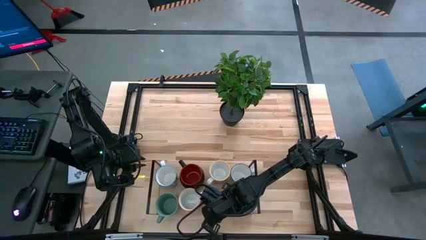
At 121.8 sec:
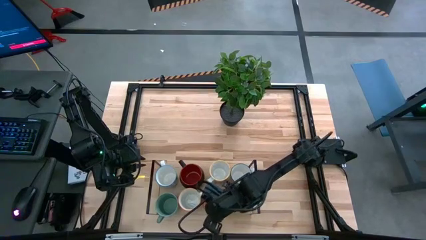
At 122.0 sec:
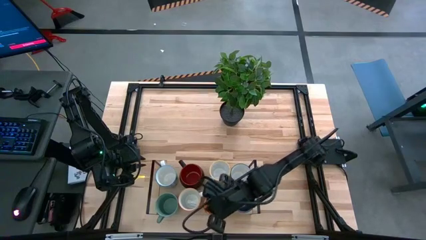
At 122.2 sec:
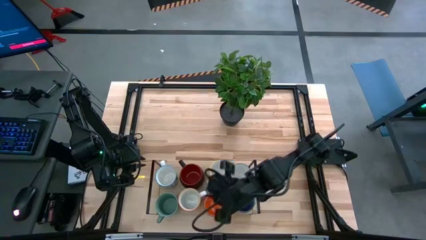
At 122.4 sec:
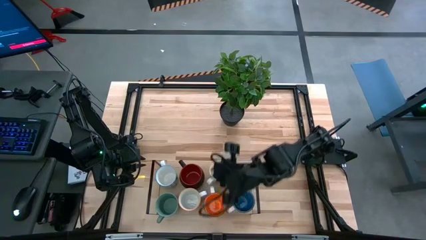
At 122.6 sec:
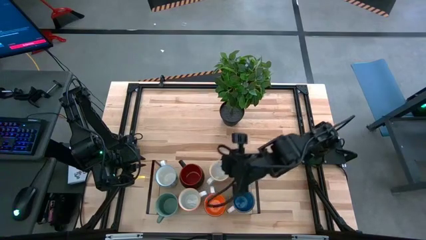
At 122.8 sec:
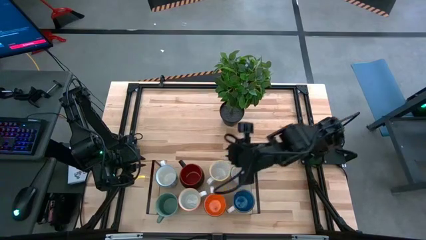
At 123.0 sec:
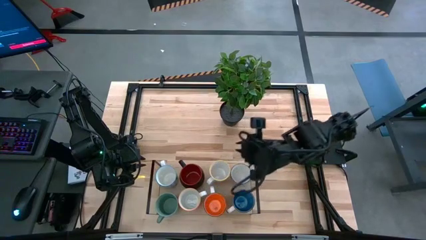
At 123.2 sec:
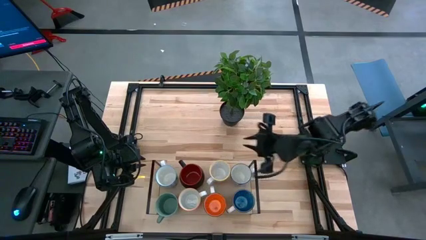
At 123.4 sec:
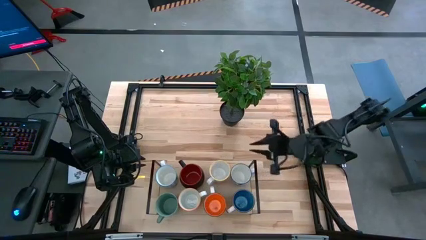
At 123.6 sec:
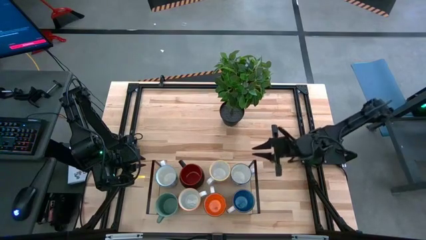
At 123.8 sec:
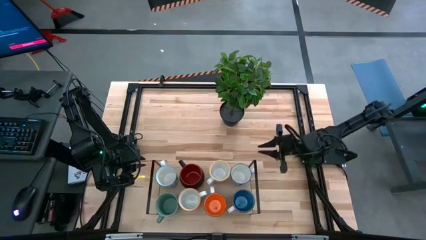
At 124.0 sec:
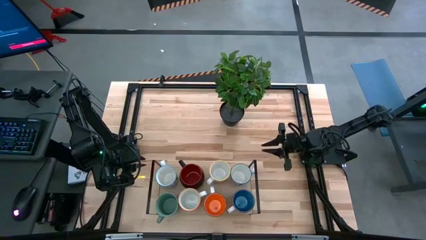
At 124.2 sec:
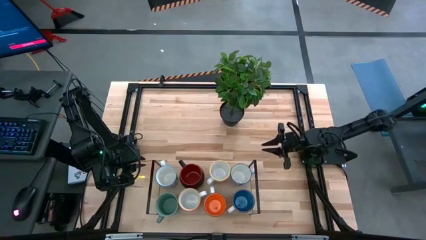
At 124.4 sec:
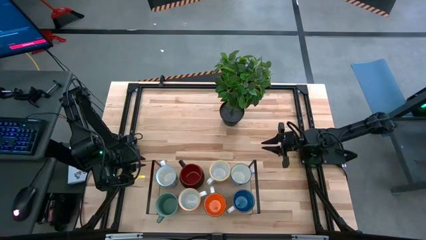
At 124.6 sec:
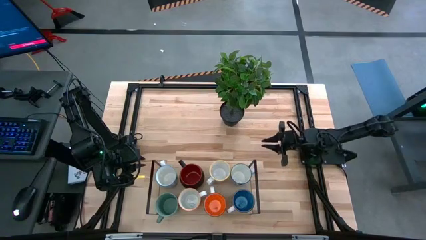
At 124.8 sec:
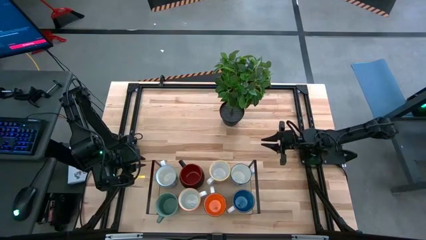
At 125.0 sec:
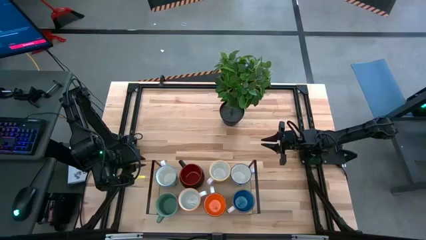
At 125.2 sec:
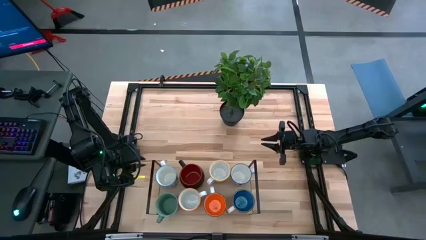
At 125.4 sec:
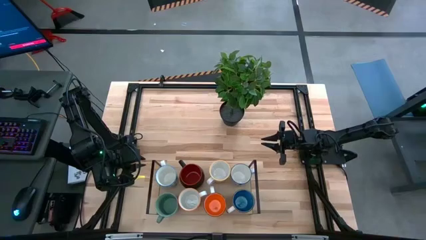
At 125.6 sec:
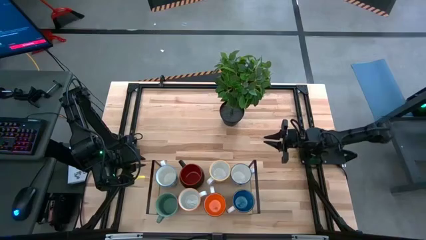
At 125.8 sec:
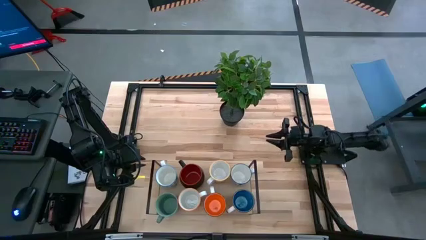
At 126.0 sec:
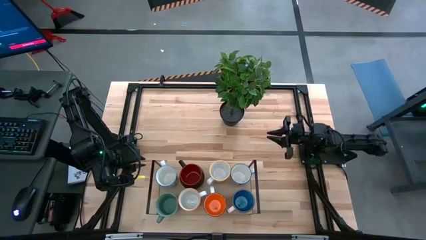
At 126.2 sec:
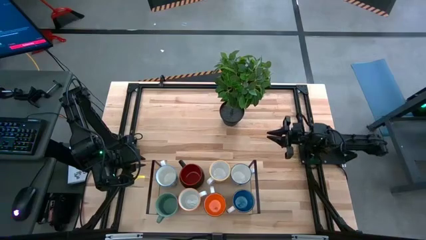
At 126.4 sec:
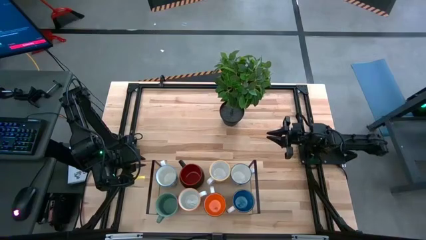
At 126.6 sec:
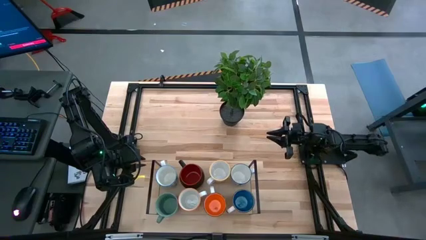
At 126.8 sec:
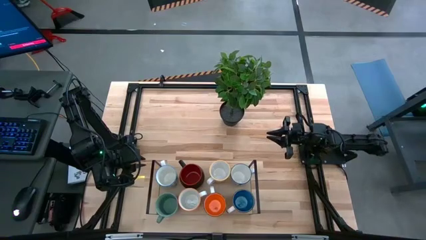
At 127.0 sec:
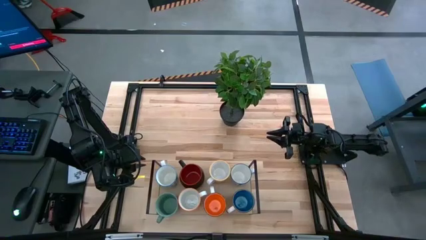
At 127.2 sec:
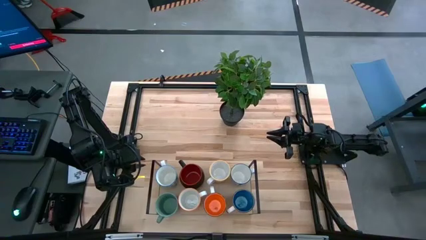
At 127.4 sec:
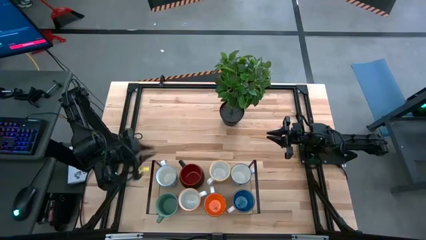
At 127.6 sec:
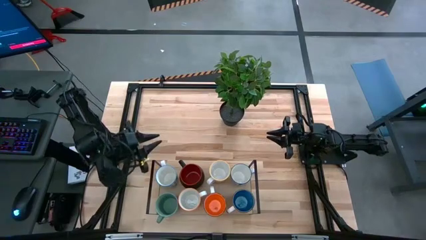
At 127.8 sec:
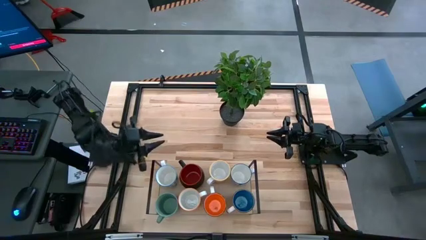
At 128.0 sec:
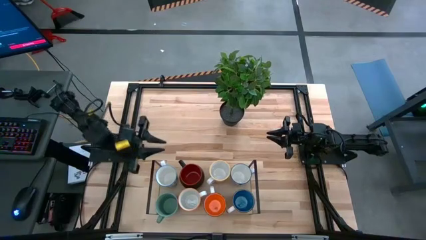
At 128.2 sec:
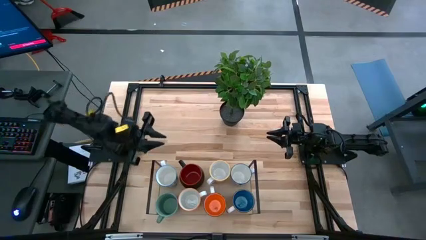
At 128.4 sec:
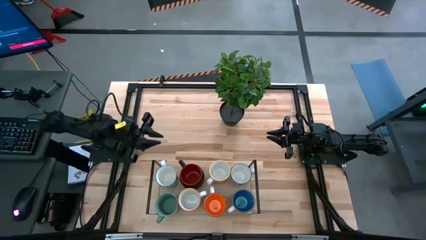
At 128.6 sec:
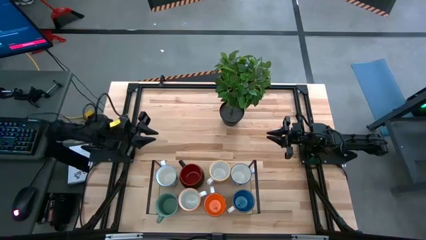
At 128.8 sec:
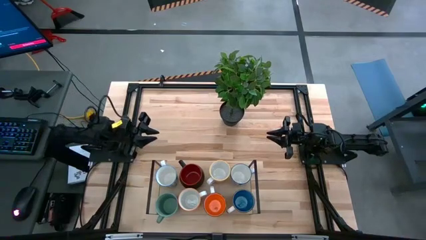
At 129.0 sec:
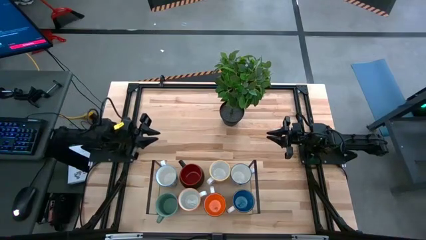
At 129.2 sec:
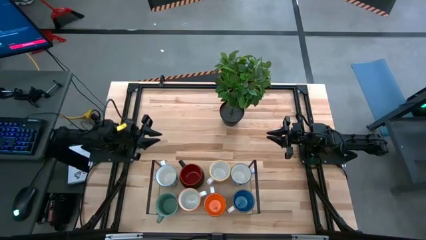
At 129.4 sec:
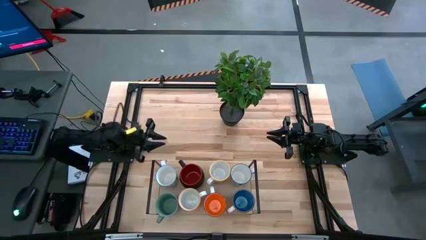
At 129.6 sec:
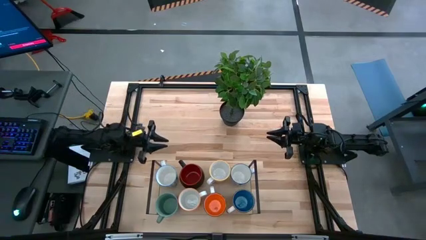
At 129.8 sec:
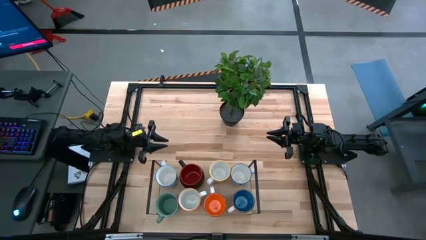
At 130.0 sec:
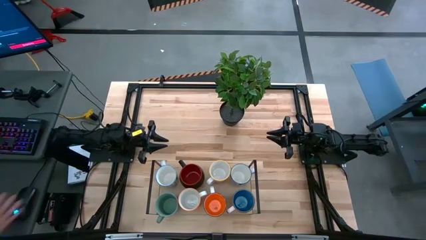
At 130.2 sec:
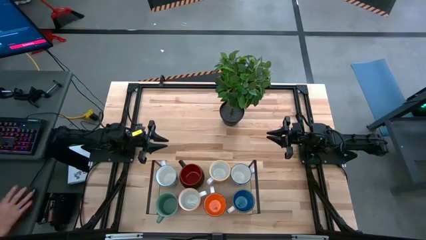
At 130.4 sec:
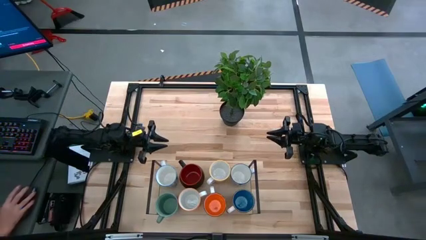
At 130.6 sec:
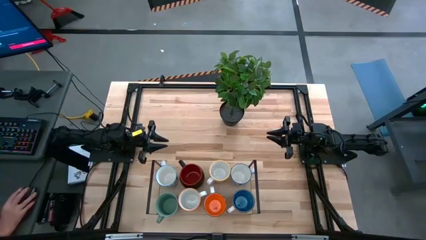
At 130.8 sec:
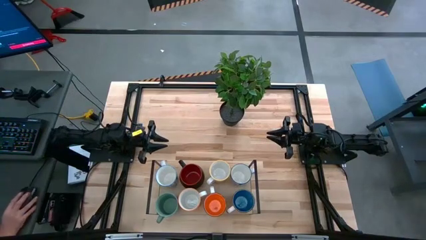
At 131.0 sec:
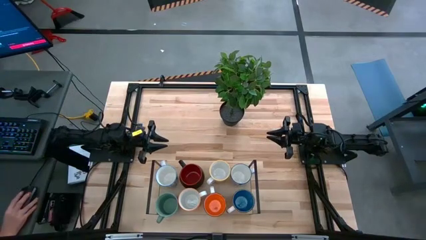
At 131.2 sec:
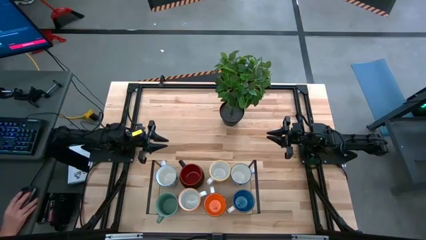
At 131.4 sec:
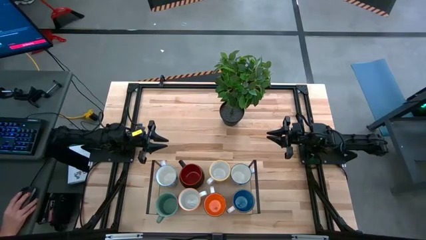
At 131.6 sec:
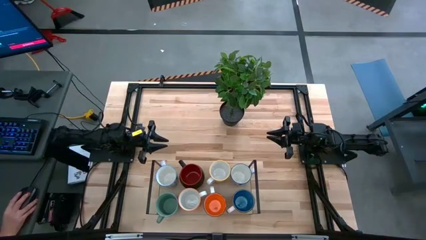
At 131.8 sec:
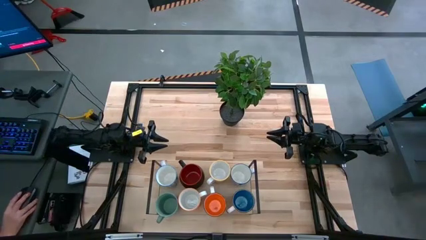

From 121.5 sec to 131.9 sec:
Task: Place coffee mugs
Return to Home Position

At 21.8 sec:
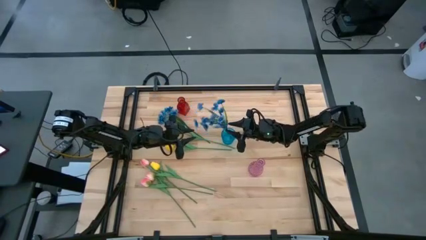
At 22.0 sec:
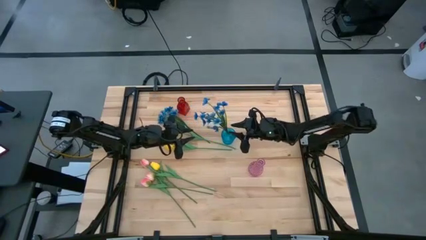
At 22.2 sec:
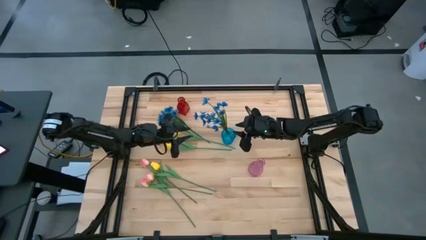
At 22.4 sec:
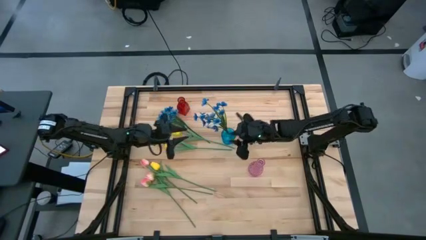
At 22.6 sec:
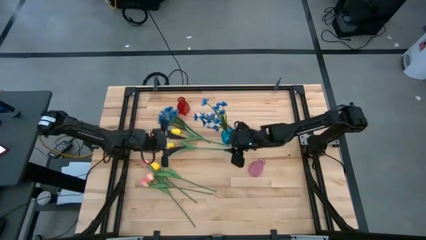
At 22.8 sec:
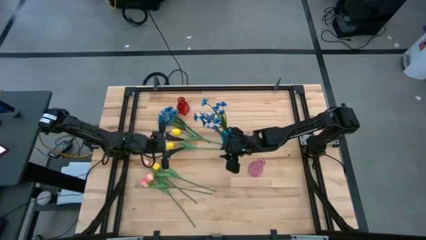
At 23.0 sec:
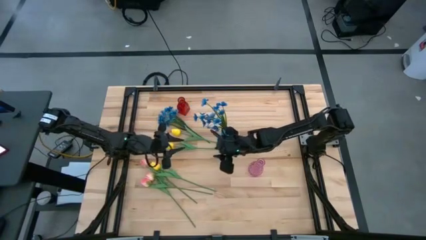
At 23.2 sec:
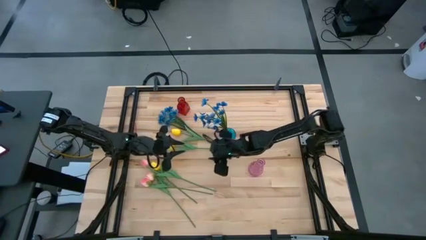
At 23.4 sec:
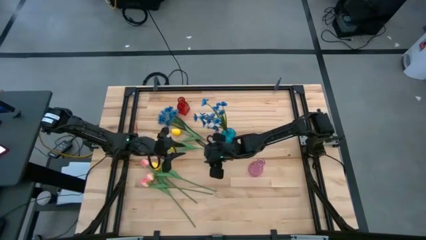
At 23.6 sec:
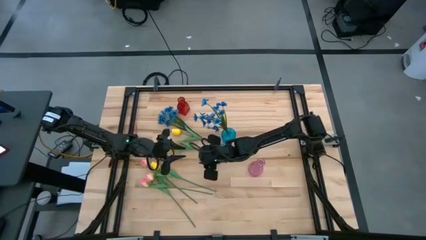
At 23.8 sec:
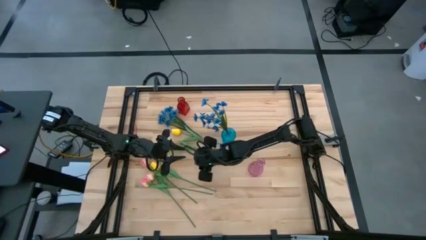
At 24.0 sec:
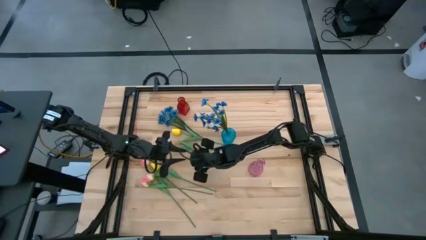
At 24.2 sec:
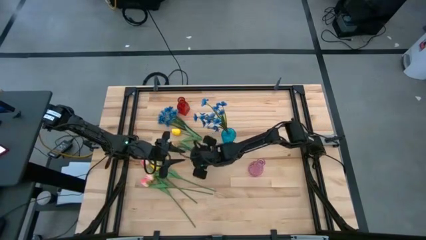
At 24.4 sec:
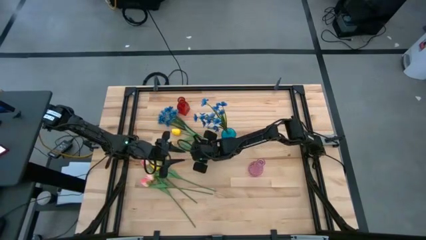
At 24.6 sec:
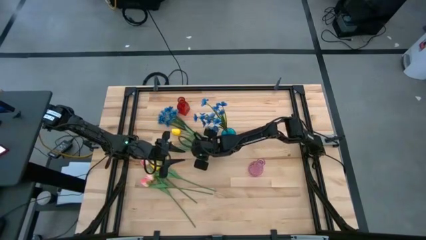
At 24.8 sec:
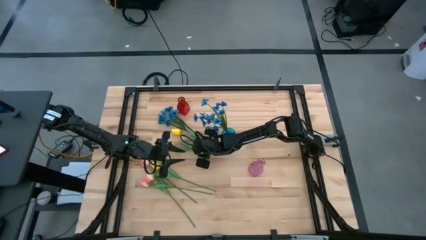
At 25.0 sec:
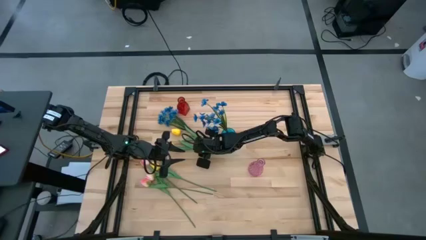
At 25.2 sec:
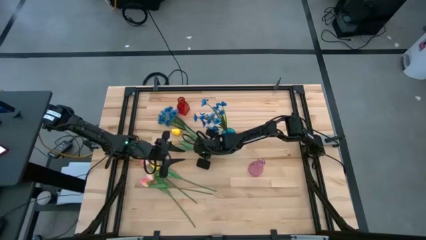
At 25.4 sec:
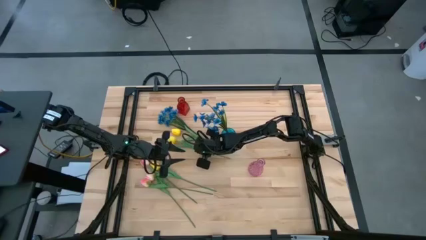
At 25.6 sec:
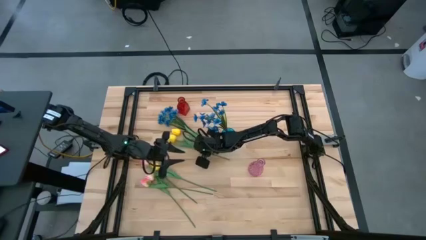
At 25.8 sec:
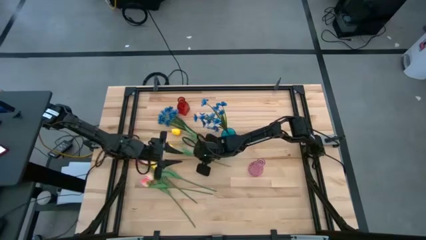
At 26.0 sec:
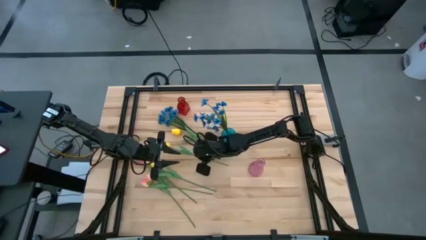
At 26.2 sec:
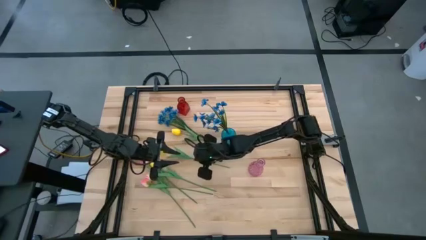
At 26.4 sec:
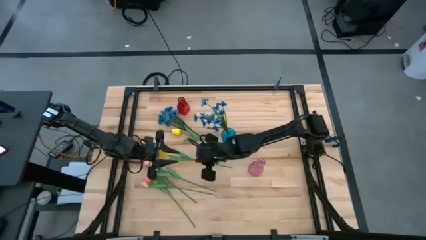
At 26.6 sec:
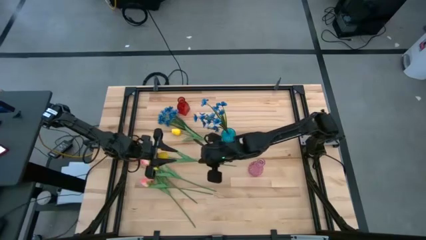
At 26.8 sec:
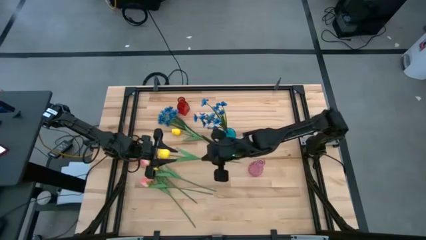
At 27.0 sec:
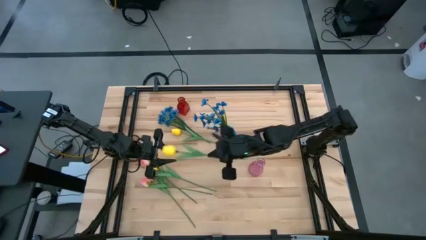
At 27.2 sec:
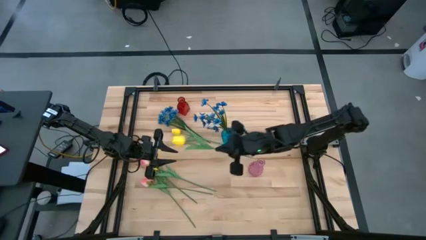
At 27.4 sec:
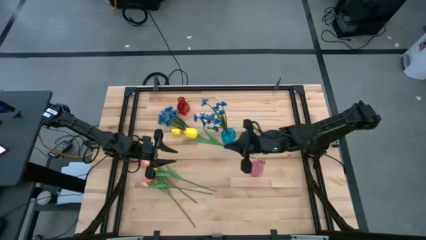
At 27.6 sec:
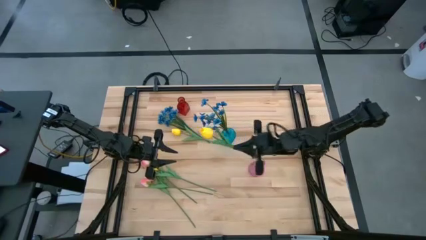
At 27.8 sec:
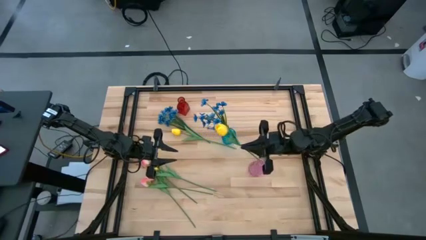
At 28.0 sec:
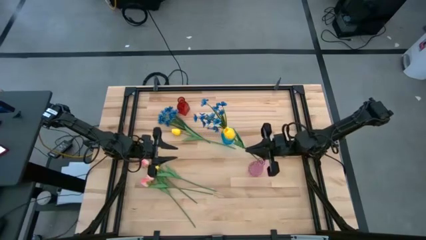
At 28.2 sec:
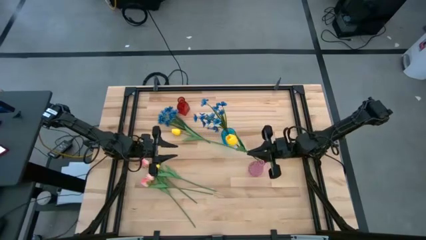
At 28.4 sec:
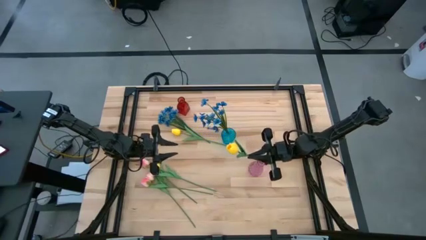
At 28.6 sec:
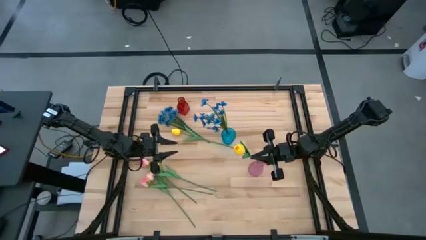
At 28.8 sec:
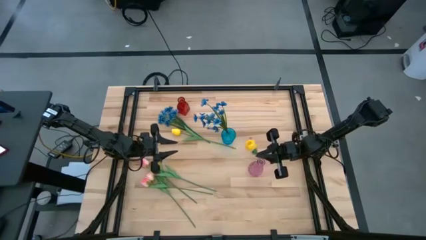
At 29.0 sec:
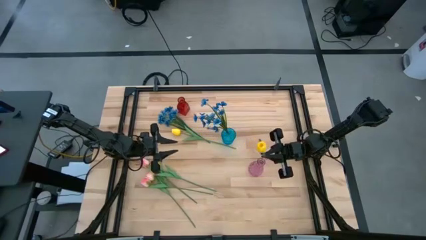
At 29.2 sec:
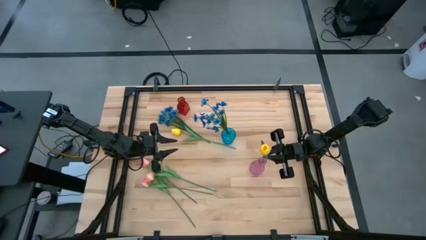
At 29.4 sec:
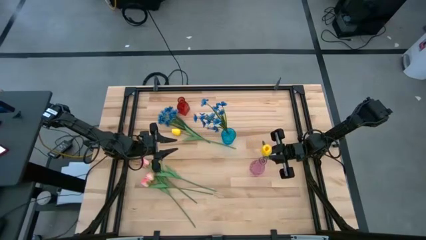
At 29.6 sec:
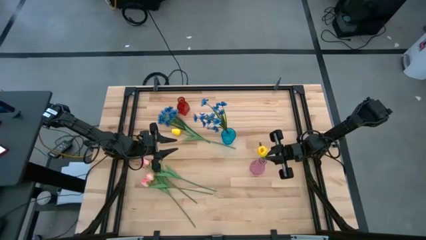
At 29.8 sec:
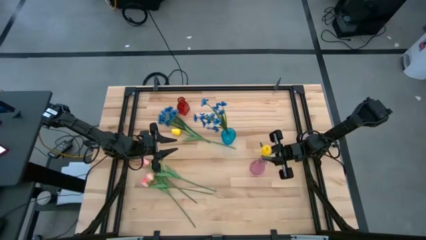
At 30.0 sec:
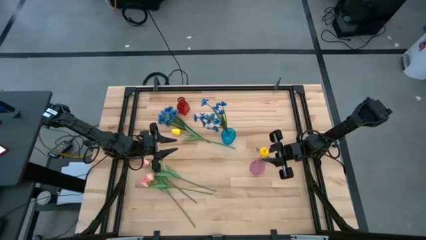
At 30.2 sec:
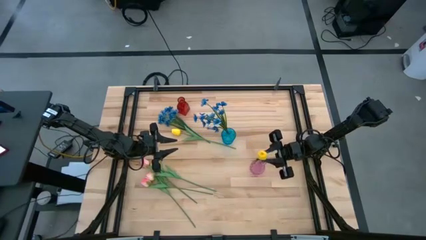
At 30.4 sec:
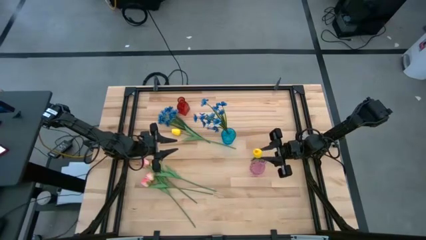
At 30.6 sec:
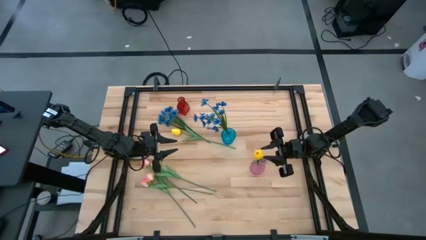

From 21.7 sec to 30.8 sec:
Task: Sort flowers into vase by color
Put the middle yellow tulip into the violet flower vase
